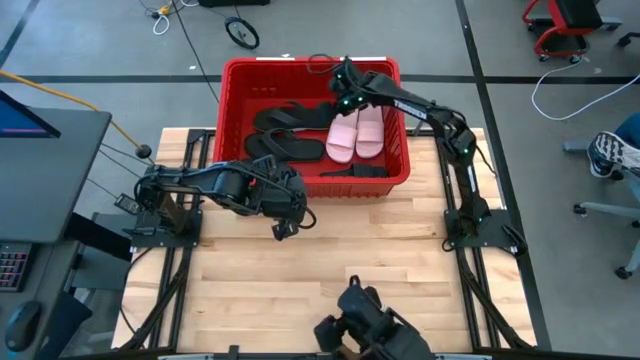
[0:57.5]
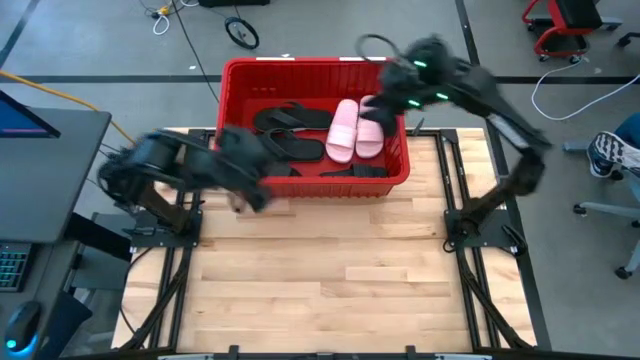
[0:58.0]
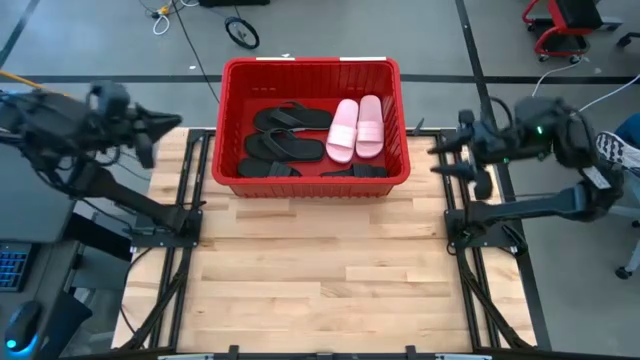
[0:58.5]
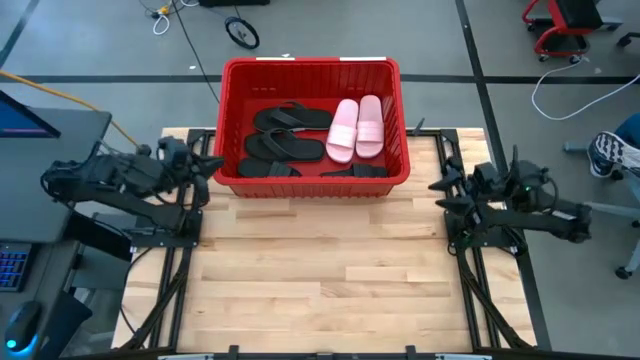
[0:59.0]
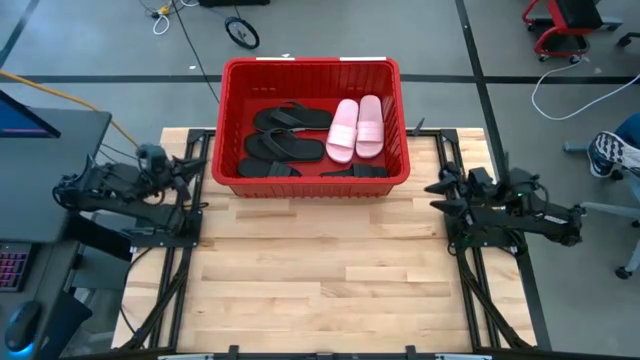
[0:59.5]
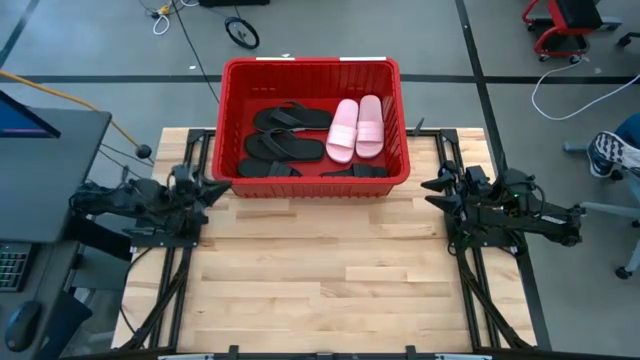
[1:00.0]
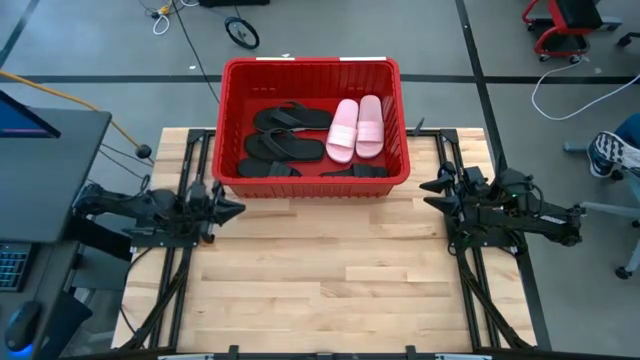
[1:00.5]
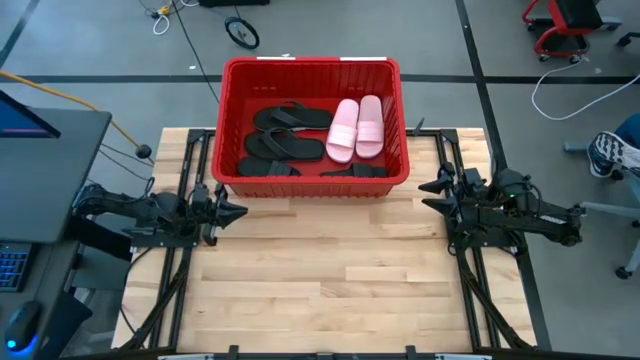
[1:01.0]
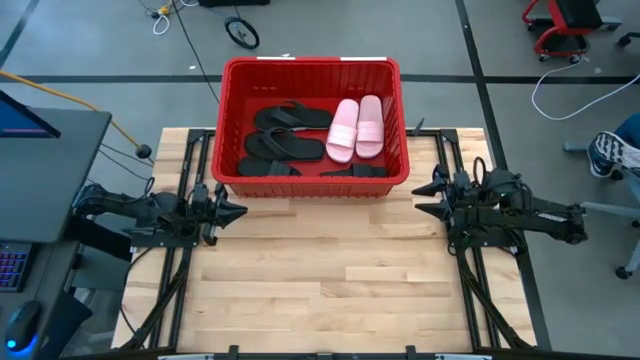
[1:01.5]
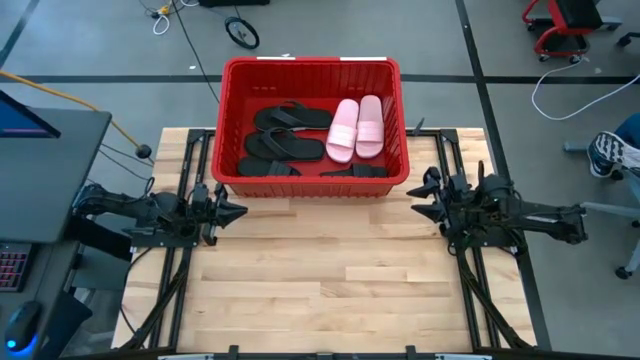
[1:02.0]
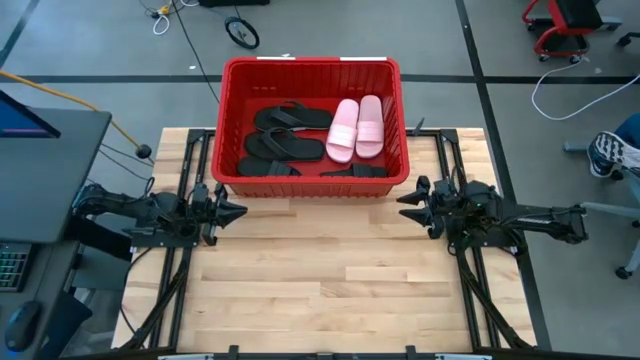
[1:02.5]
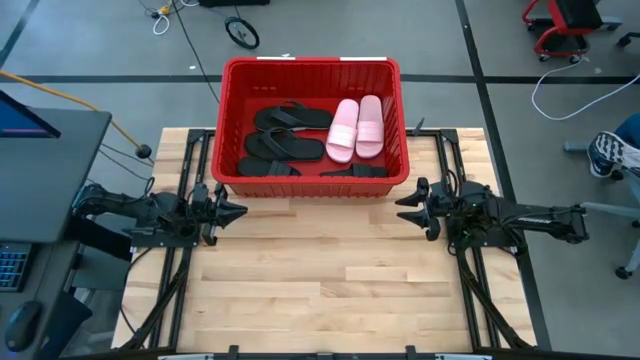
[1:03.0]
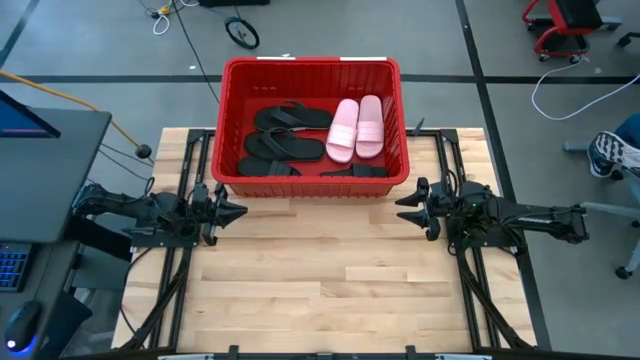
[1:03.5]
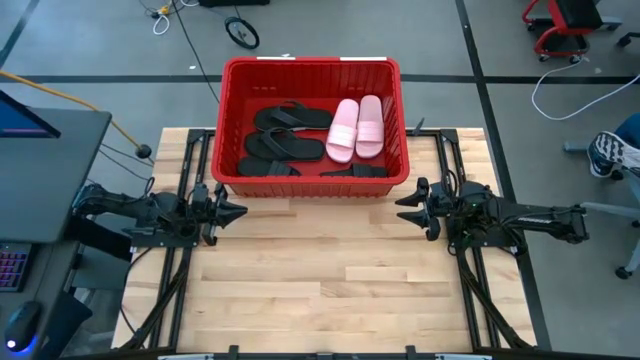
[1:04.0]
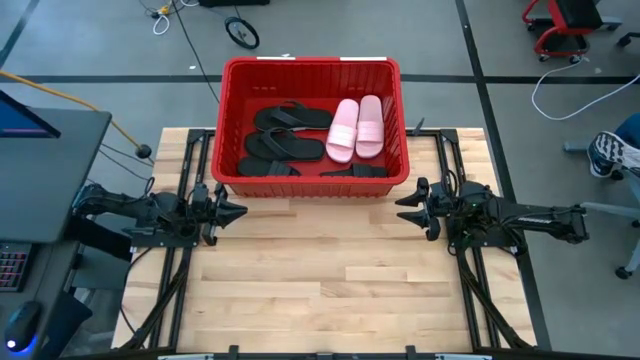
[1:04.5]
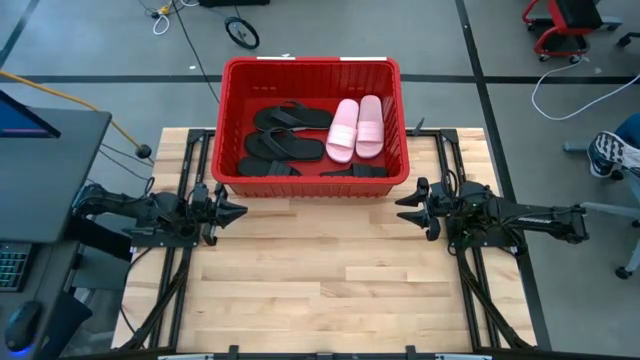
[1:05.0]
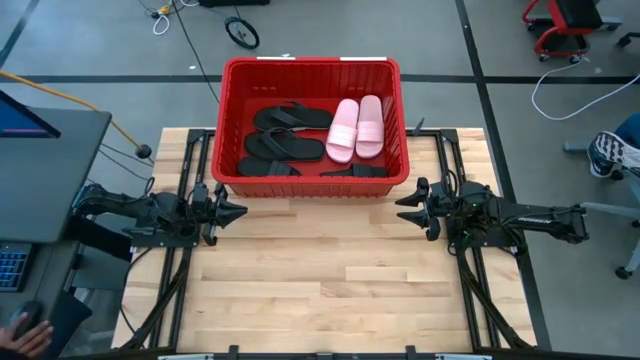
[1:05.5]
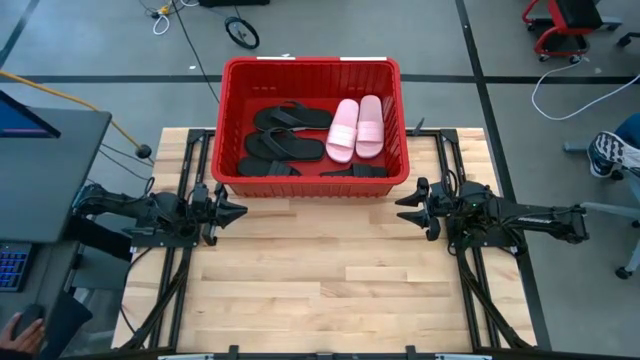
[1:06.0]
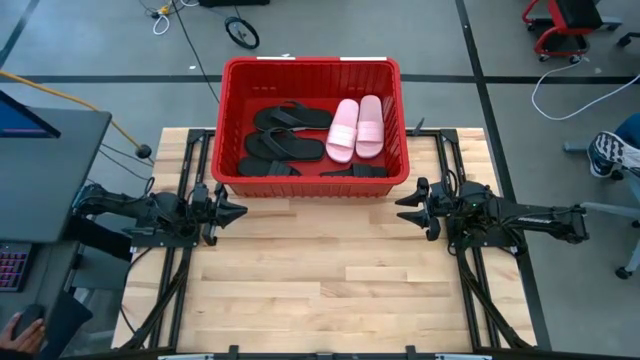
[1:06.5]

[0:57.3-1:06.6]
Task: Pick and place slides into bin
Return to Home Position

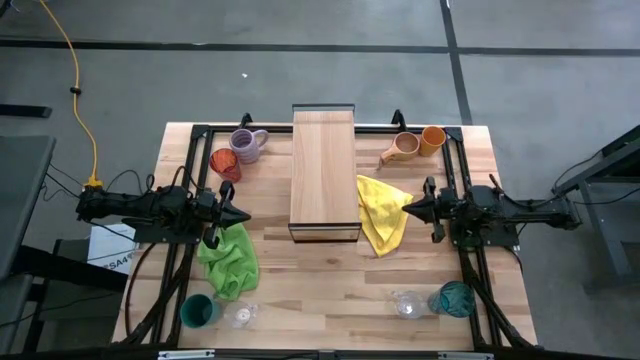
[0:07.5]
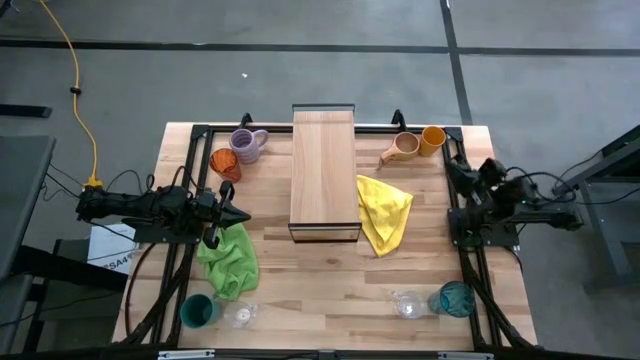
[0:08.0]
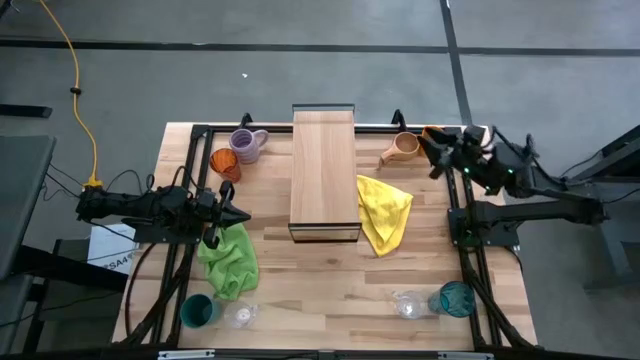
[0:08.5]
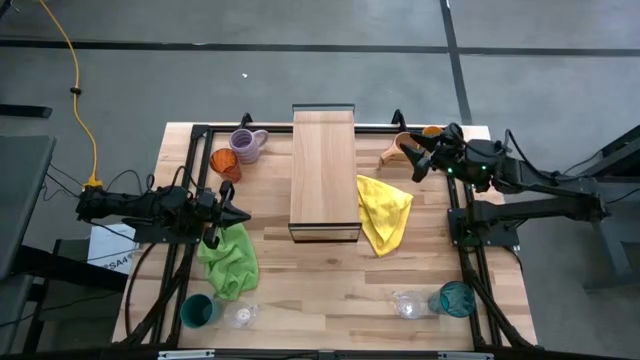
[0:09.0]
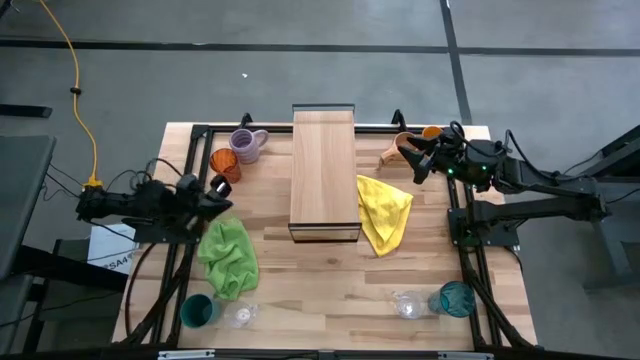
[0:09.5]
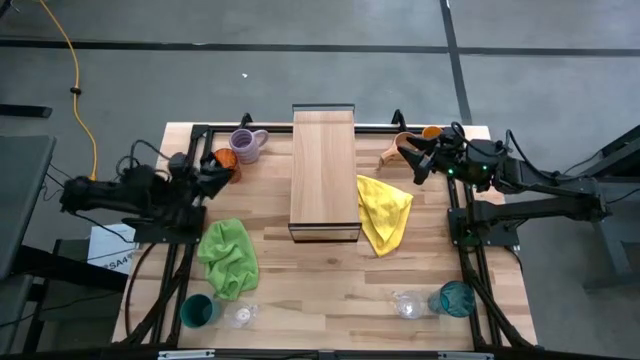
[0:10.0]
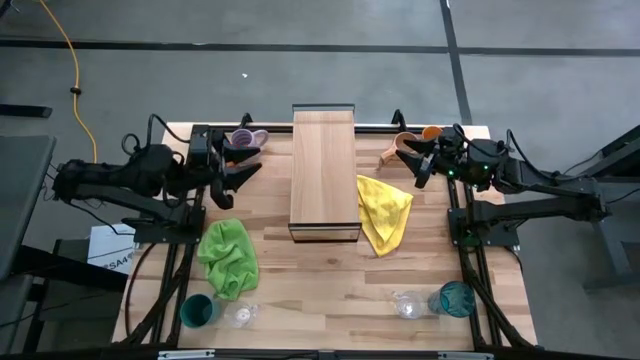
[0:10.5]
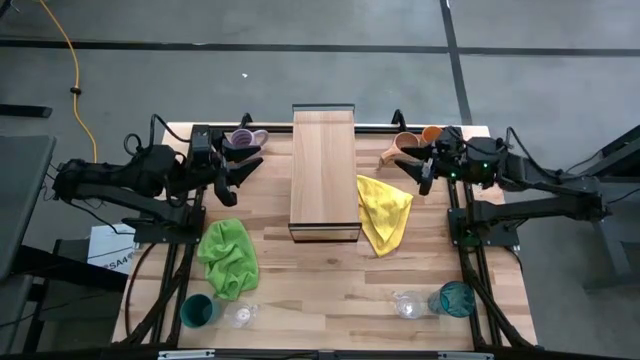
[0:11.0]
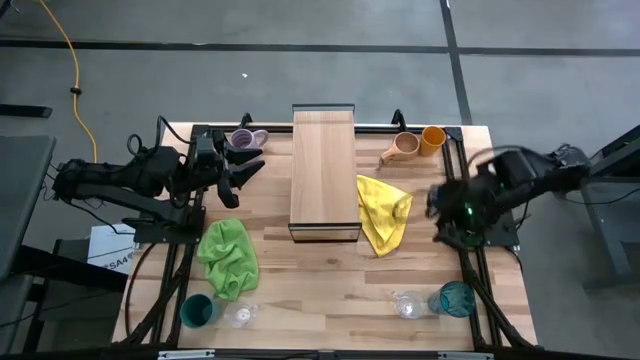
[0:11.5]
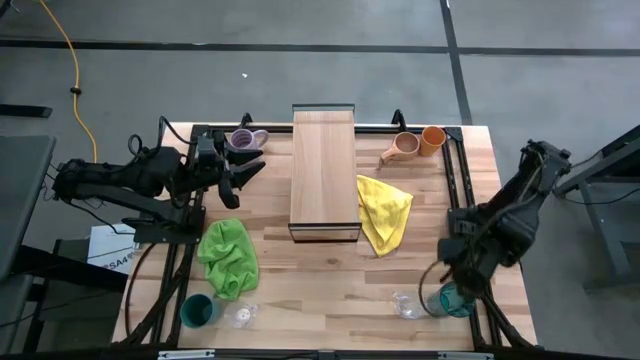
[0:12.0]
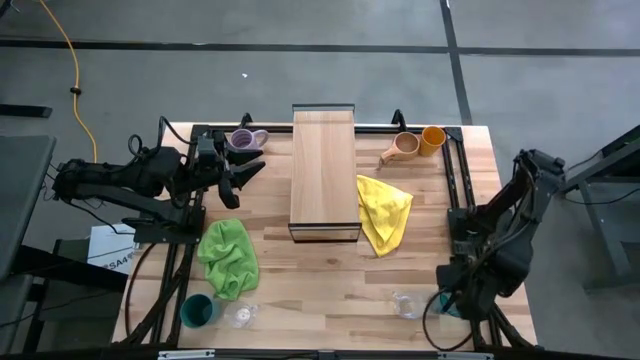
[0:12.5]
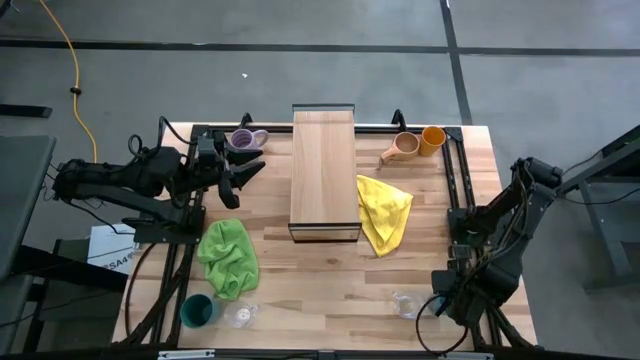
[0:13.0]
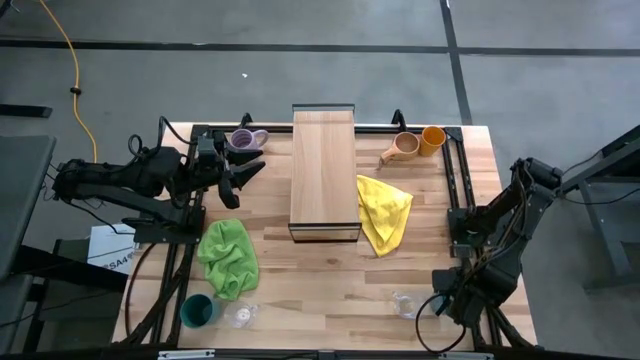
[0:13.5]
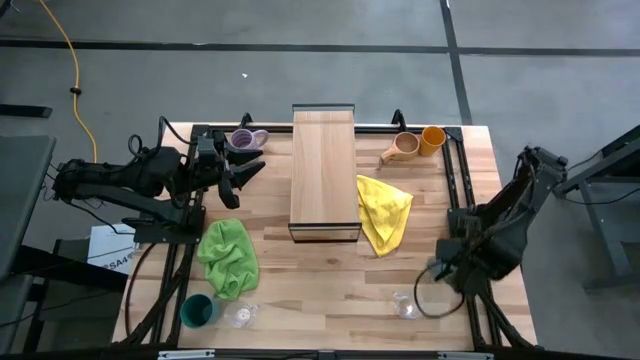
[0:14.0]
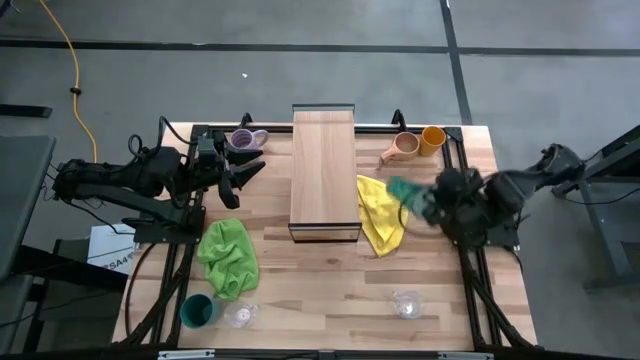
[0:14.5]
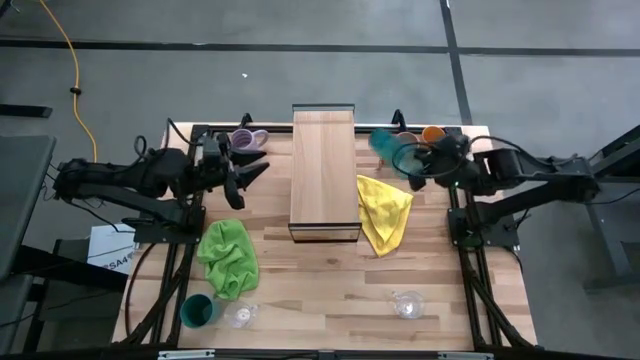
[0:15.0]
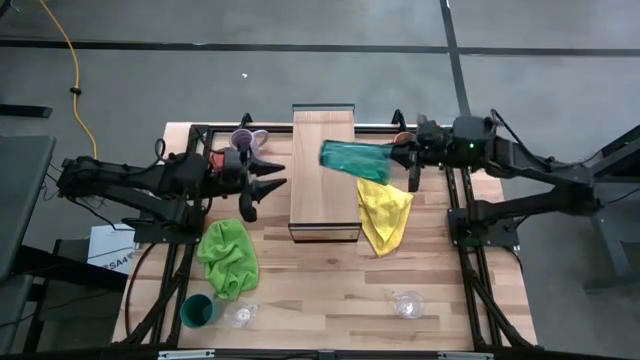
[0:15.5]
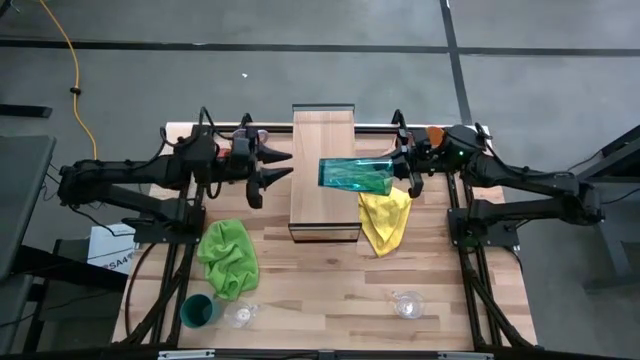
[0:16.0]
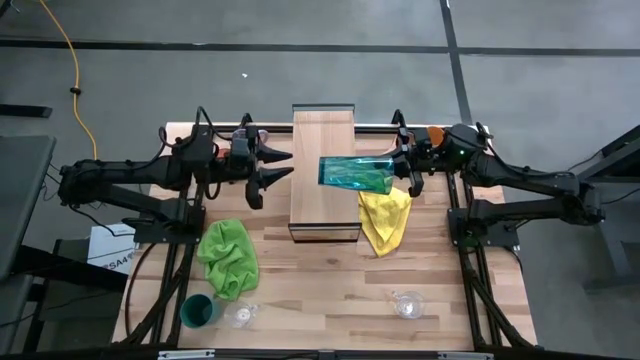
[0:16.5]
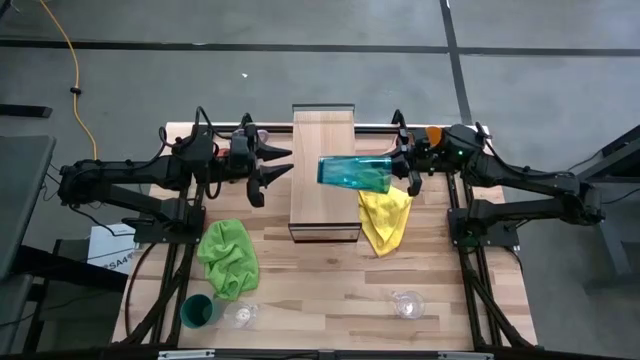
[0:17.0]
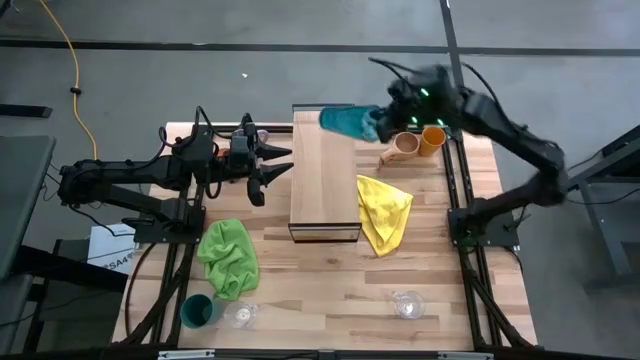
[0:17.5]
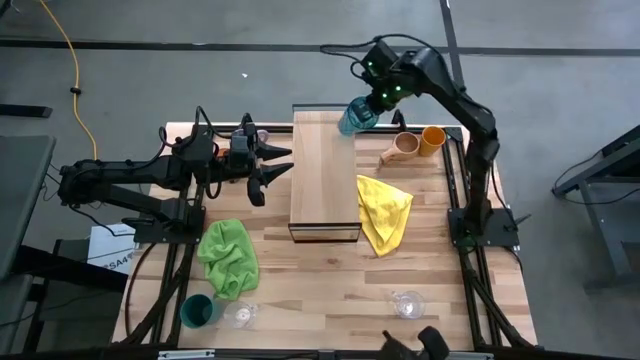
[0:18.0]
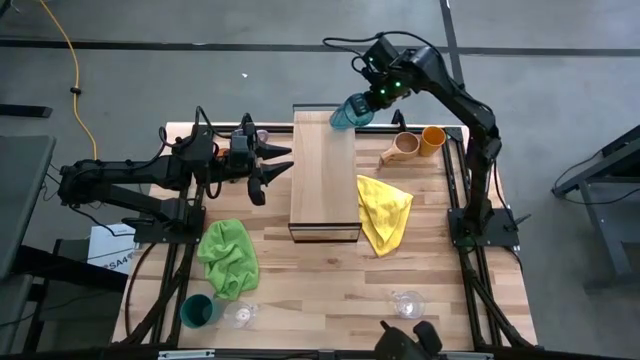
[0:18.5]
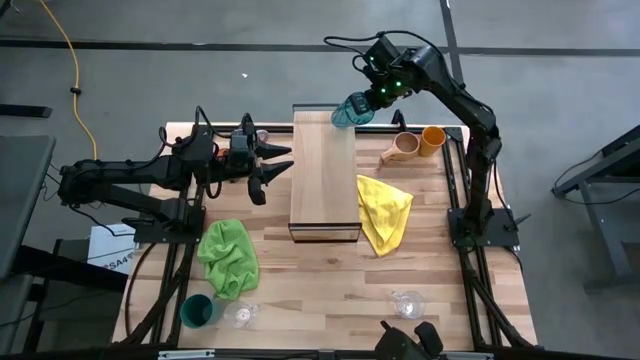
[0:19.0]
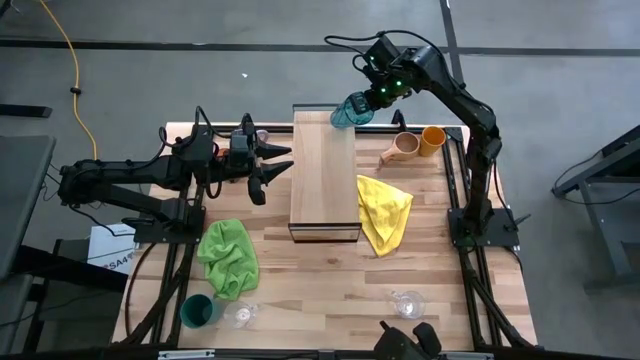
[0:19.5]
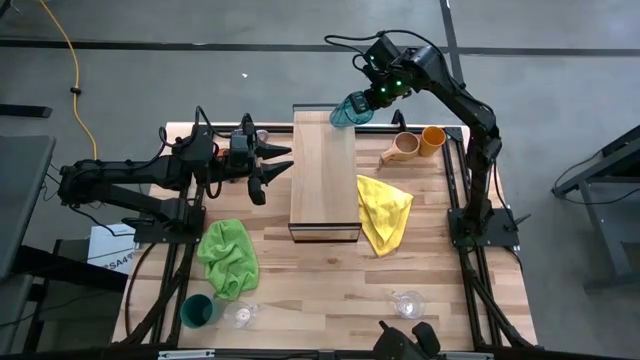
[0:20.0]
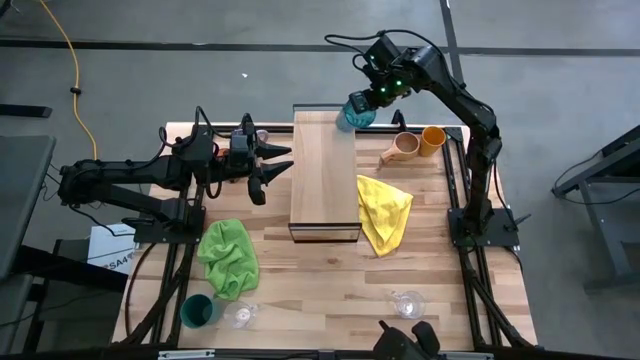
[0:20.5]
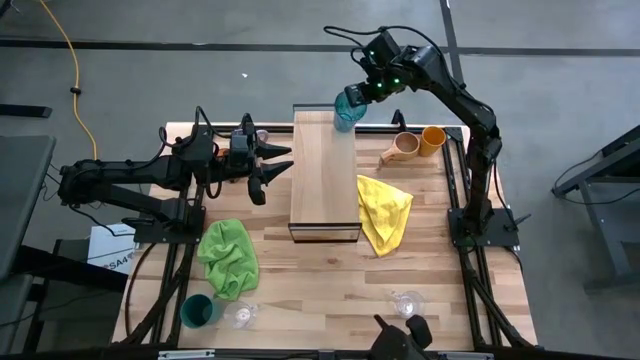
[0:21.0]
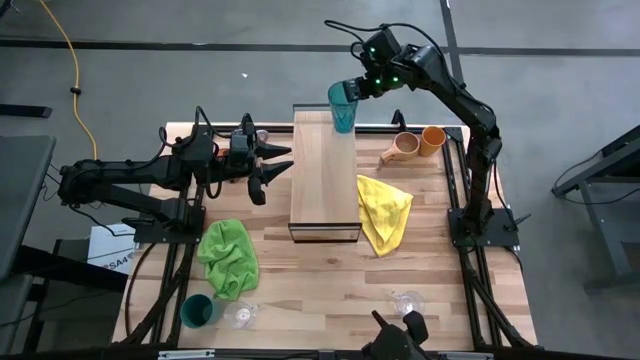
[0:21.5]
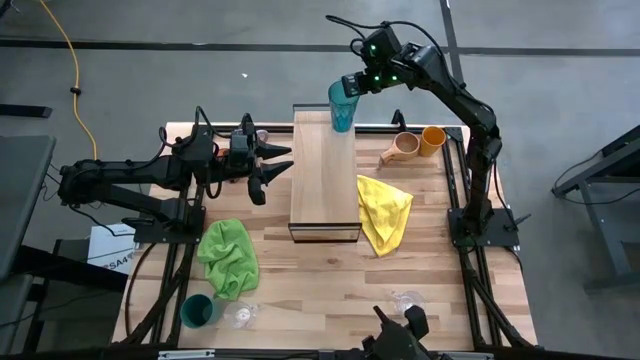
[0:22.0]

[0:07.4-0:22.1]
Task: Stack small to large cups/mugs on shelf
Put the light blue cup on the shelf
